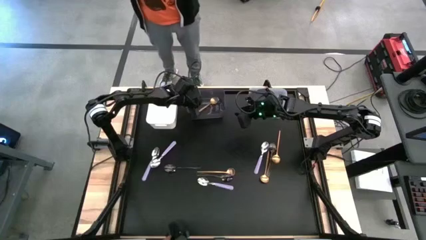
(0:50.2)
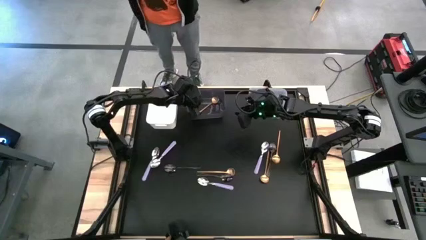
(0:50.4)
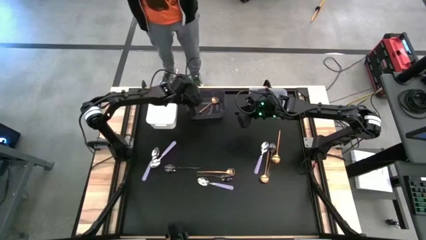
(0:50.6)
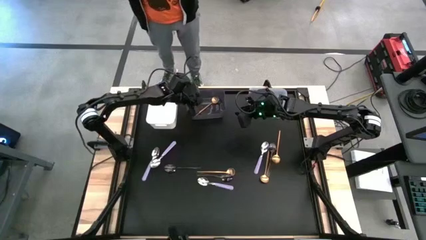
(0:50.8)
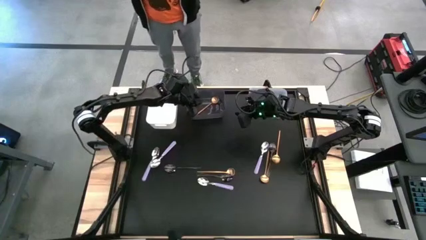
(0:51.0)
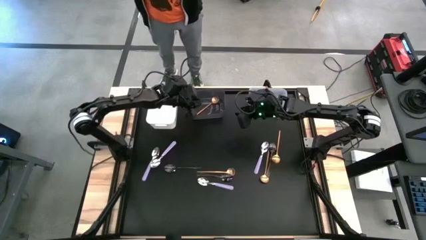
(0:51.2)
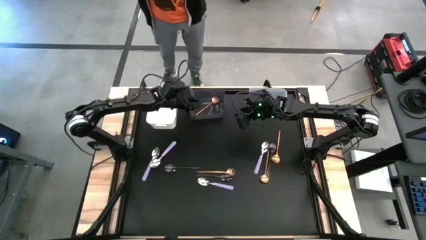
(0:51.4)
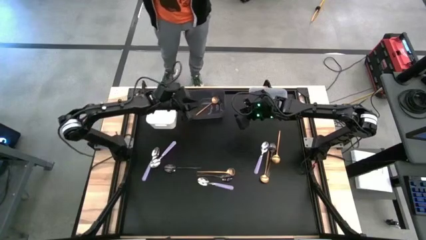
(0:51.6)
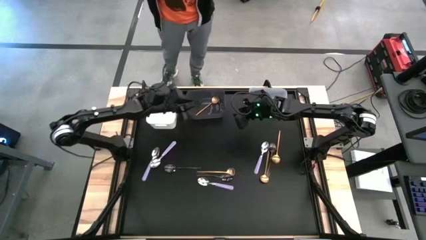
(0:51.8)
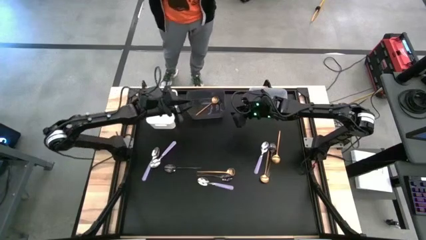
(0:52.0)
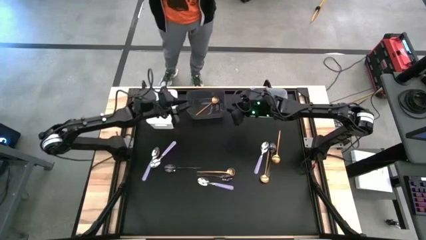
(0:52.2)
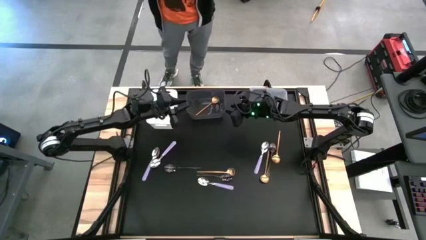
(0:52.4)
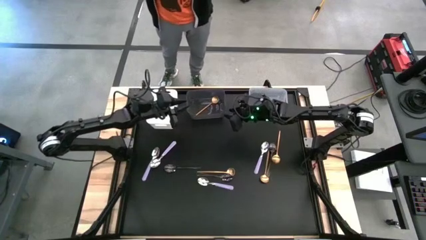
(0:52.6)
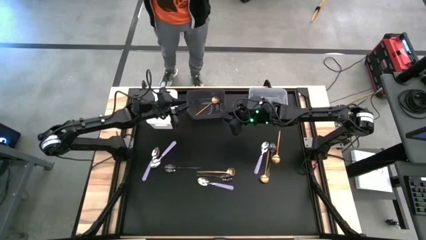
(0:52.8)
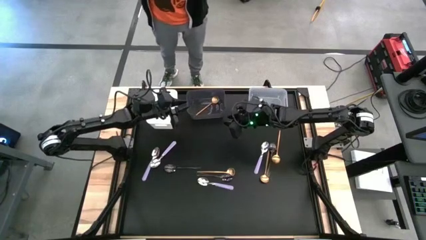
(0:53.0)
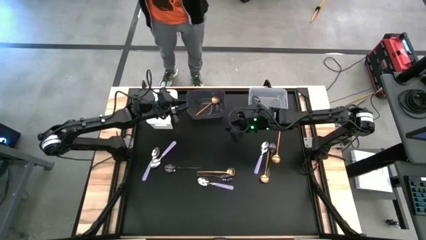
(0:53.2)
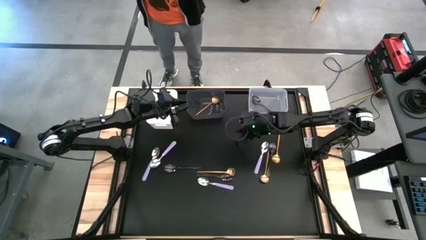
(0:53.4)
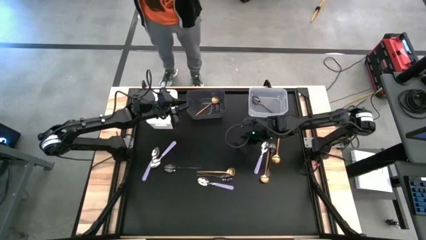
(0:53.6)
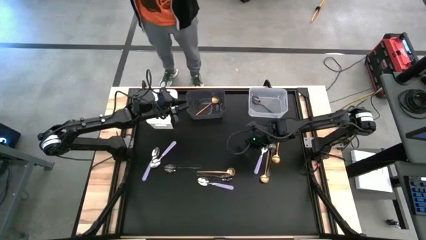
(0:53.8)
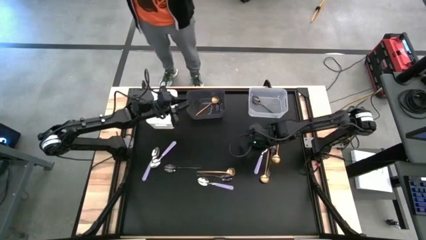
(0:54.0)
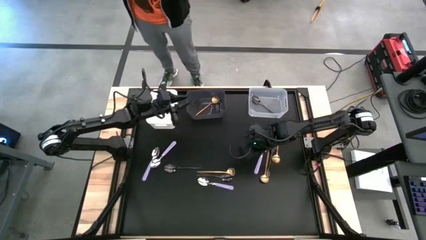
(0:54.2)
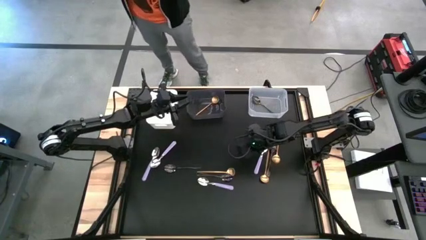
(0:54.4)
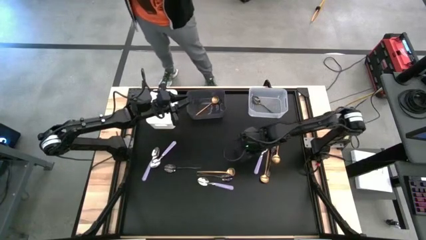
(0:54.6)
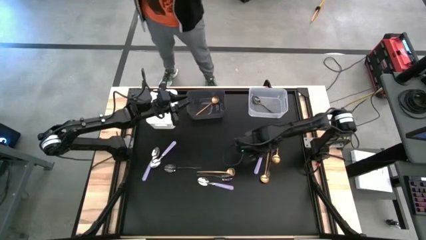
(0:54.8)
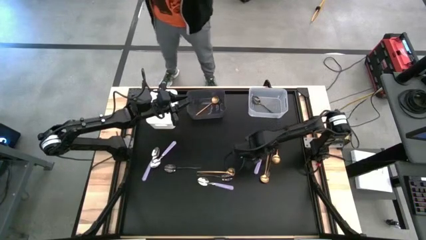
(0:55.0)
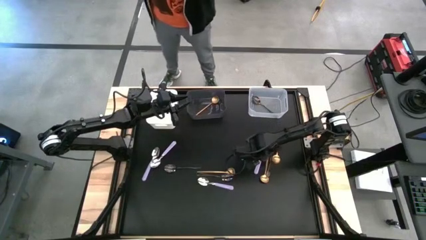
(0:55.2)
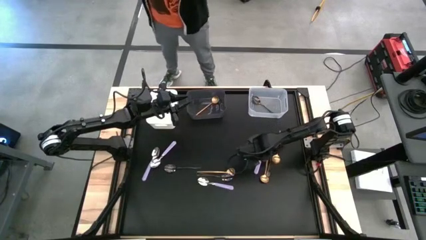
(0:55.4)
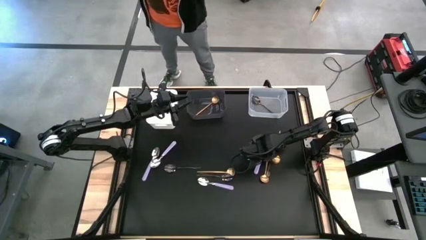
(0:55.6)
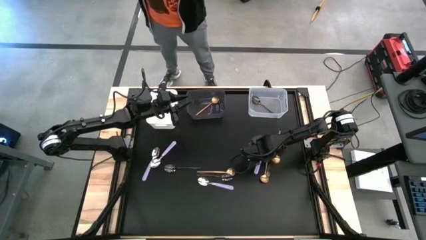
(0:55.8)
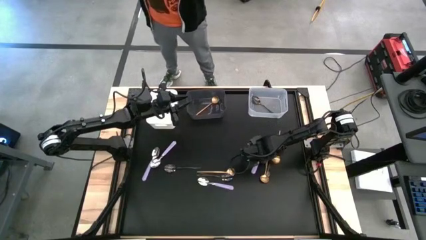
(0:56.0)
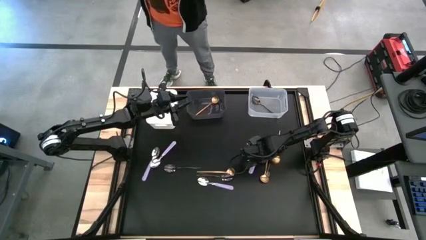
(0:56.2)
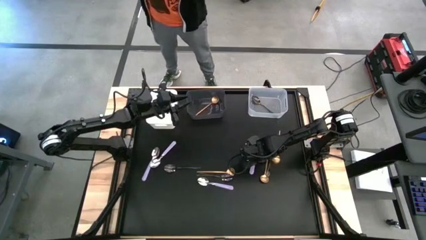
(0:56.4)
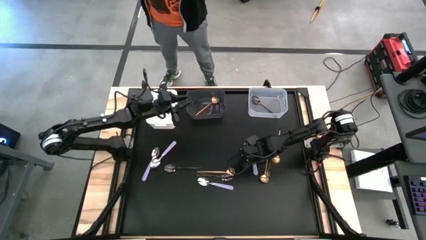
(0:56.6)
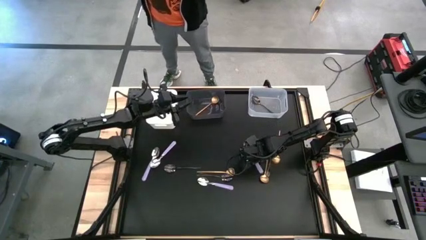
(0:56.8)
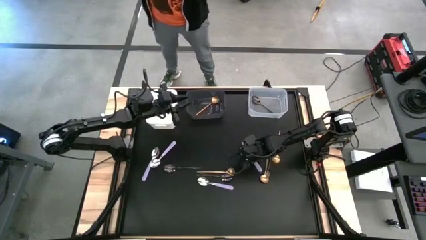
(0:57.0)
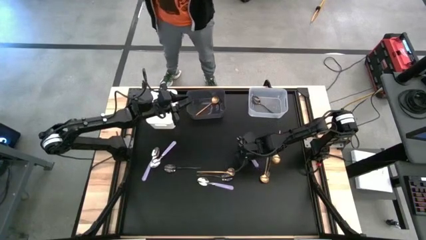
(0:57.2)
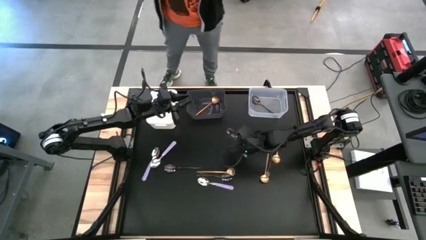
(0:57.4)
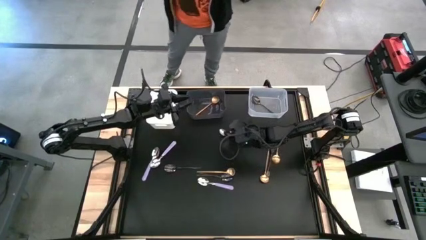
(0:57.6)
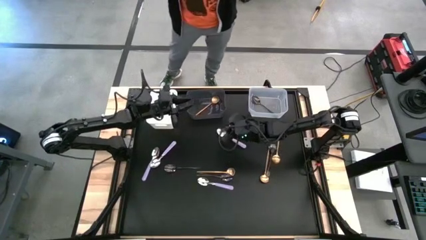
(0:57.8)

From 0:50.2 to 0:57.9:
Task: Sort silverware by color (type)
Put the purple spoon into the white bin

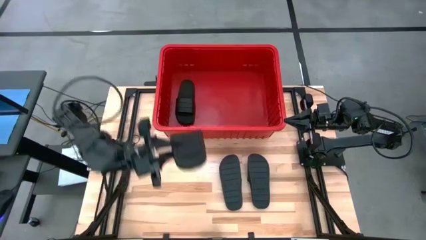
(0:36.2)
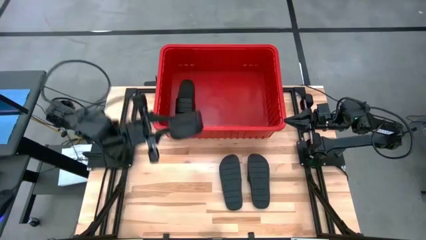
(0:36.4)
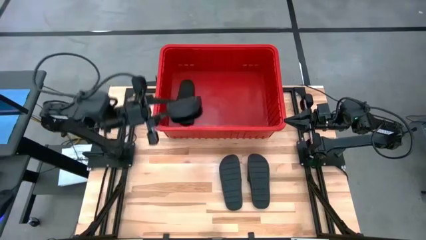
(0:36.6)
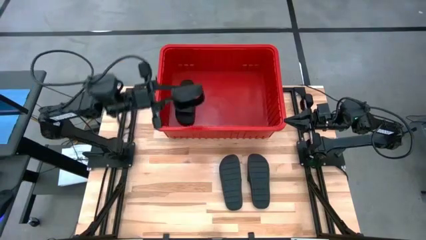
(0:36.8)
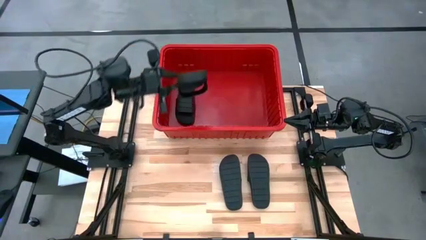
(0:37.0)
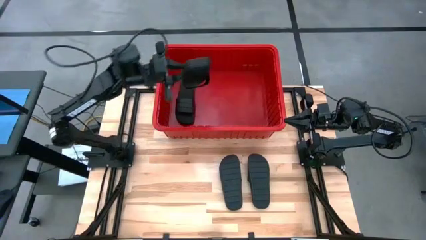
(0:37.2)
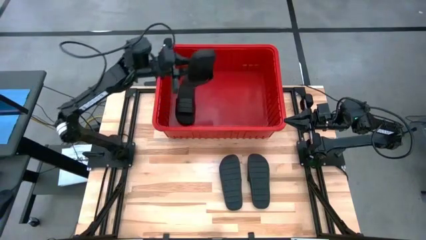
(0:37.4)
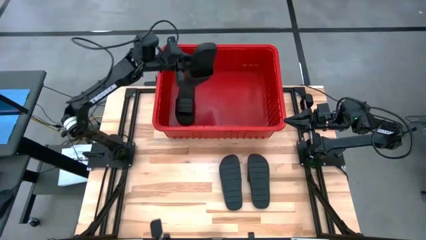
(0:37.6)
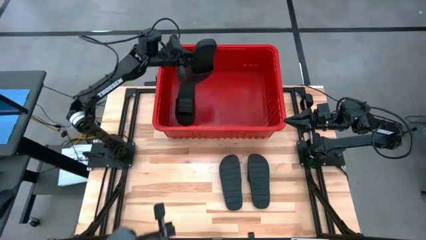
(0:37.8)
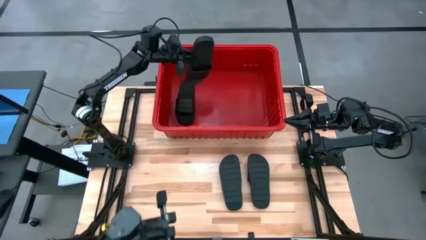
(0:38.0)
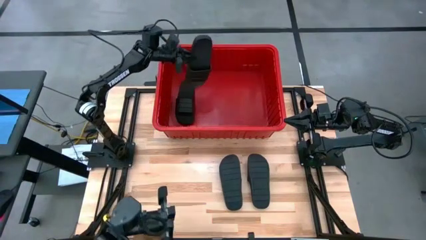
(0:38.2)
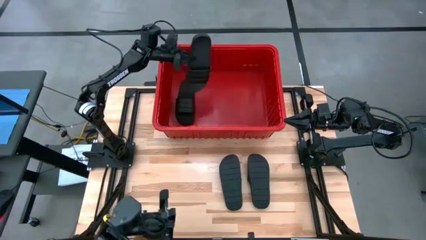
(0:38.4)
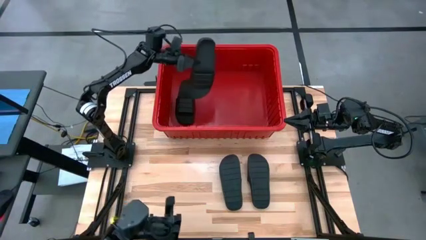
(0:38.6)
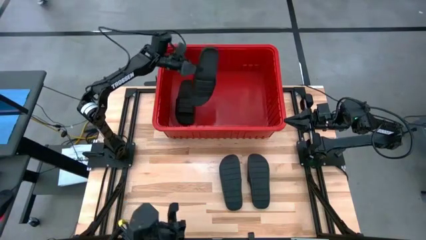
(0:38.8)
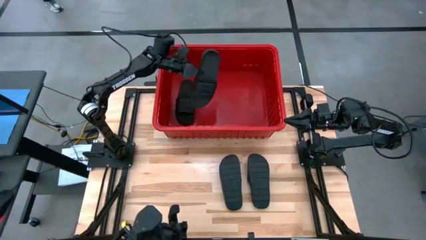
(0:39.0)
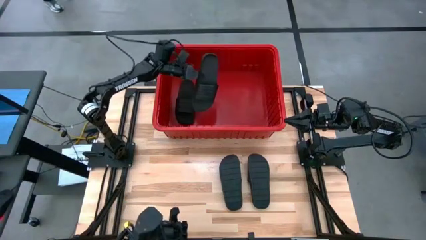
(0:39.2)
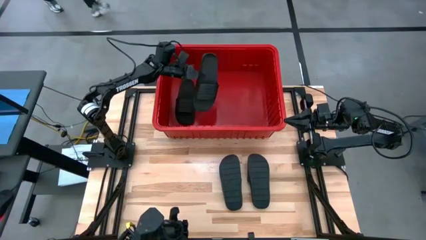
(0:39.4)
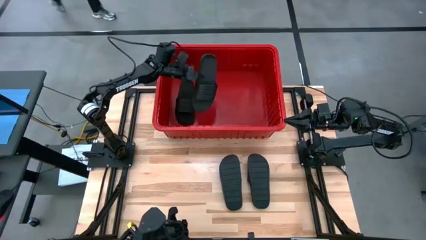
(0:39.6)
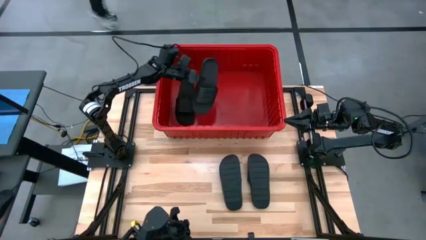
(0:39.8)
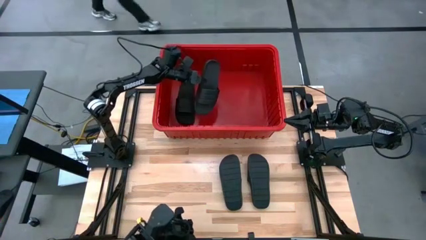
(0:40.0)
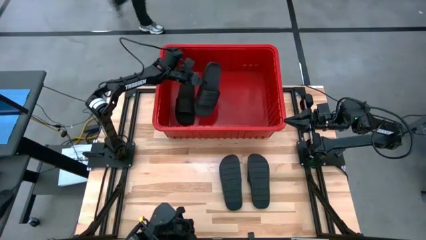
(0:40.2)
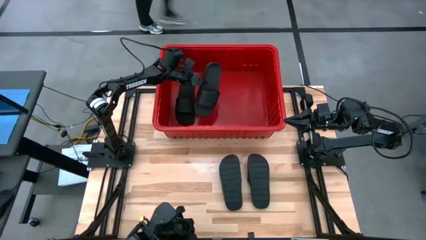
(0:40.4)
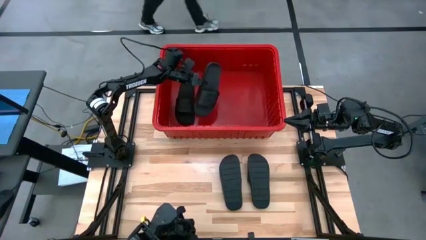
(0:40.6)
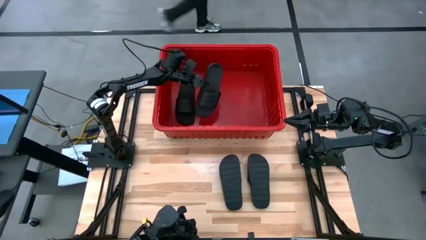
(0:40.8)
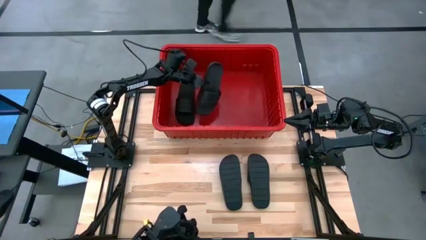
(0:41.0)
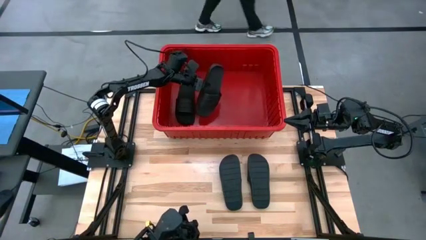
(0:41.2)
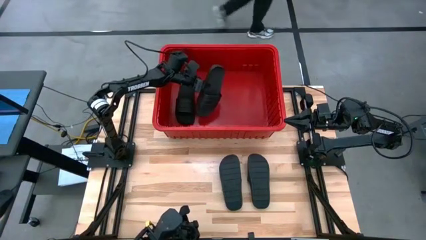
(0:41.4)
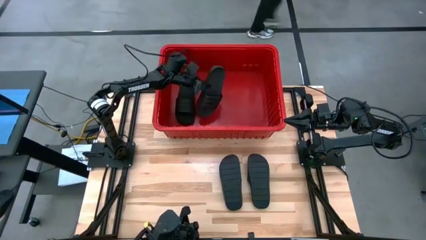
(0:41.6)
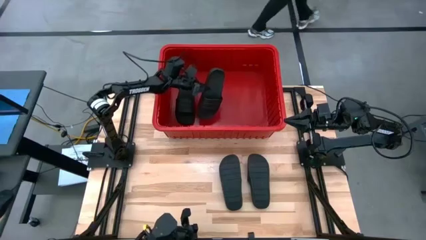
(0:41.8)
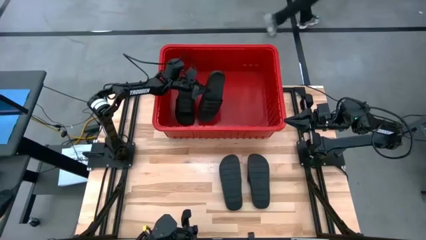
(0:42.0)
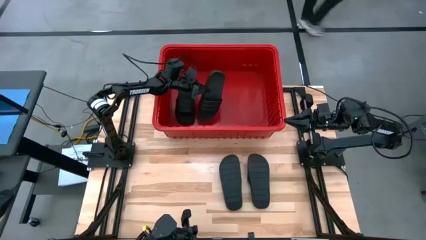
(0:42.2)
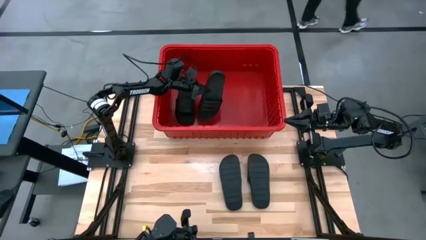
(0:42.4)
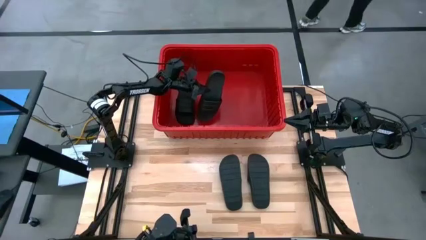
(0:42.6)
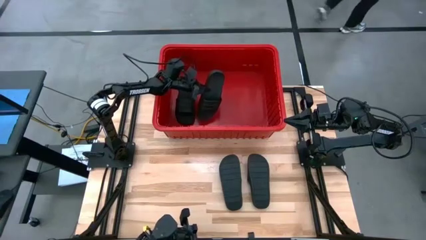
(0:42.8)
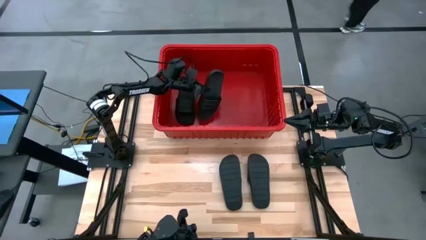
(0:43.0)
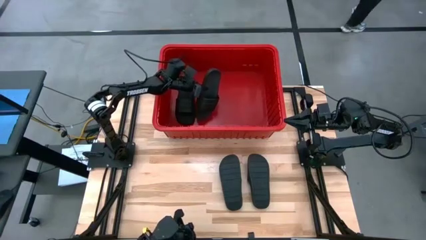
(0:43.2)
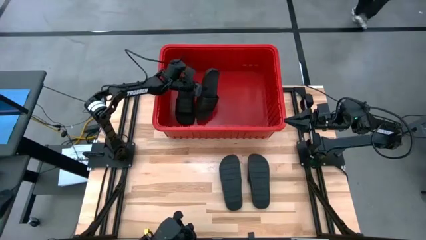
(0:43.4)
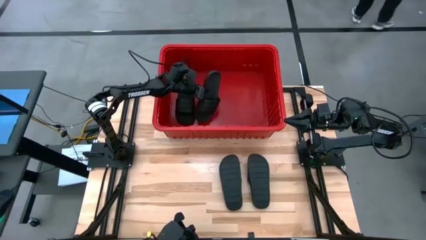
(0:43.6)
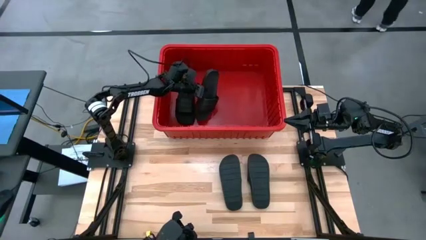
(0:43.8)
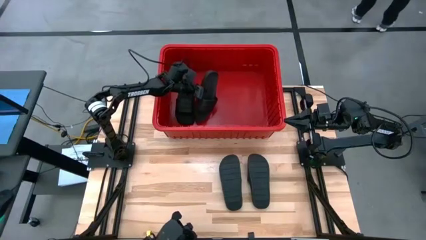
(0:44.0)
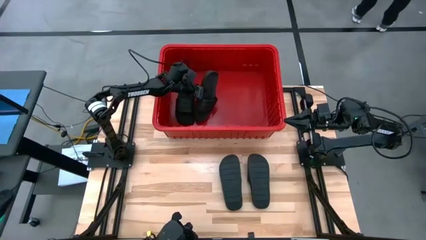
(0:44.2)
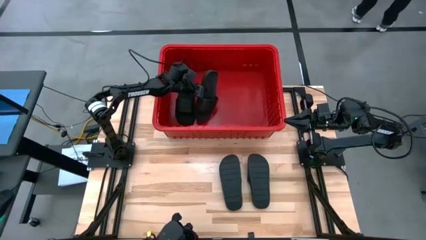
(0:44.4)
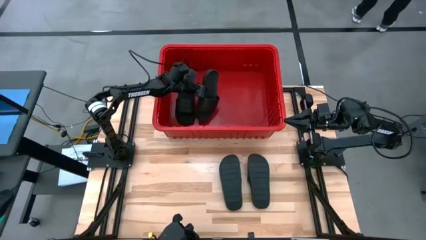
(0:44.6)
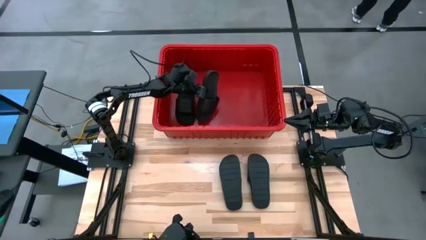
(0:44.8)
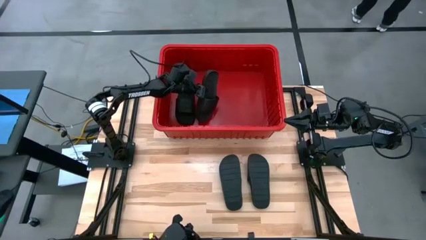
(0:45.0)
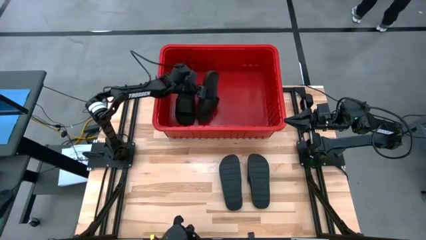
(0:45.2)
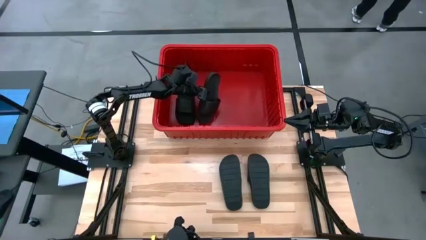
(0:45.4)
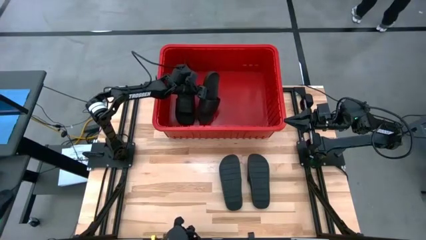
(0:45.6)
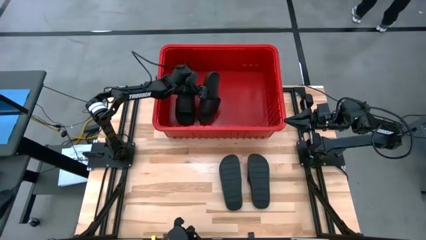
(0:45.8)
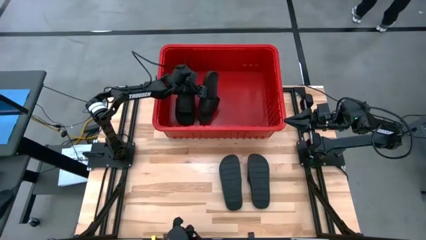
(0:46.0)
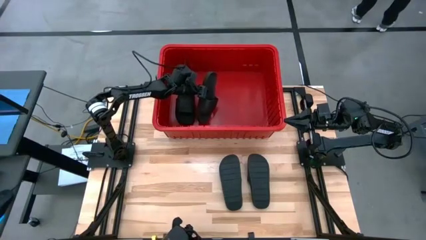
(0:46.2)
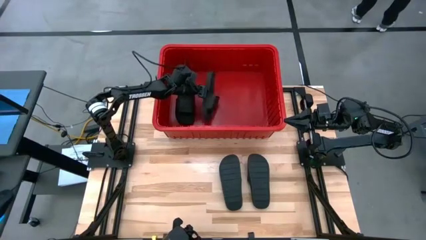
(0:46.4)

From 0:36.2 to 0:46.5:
Task: Pick and place slides into bin
Put the black slide into the red bin
